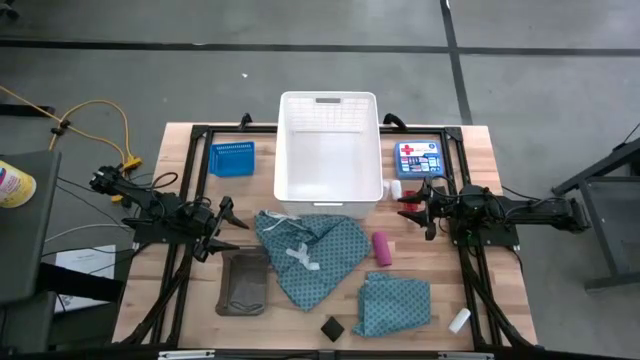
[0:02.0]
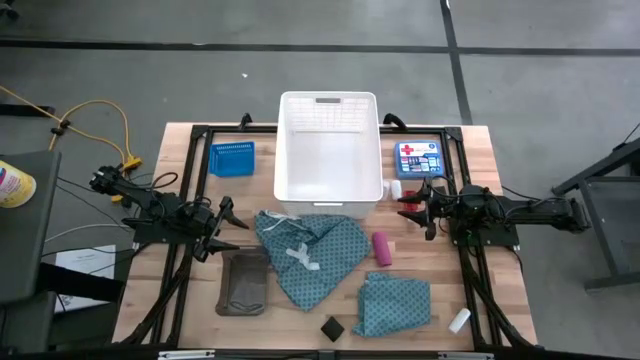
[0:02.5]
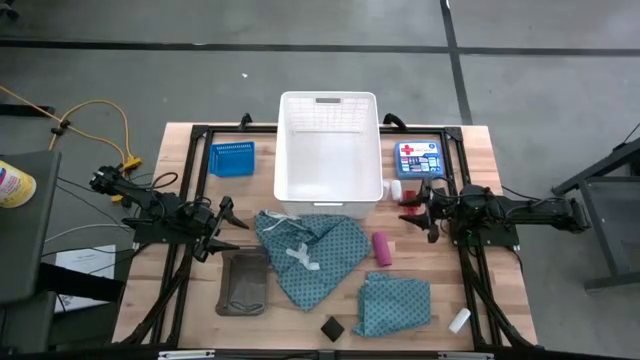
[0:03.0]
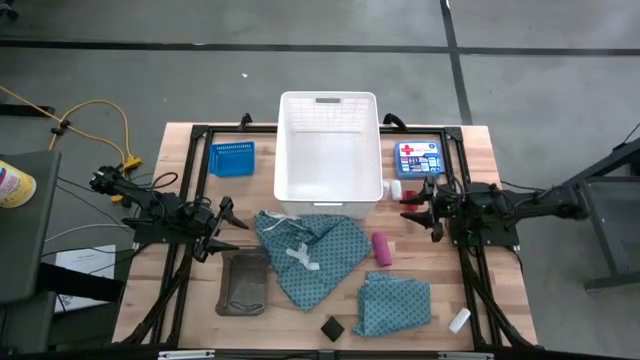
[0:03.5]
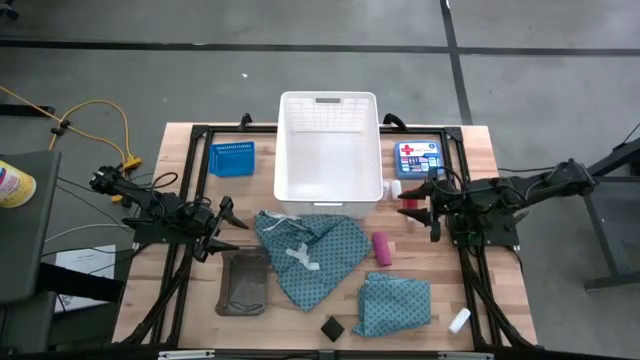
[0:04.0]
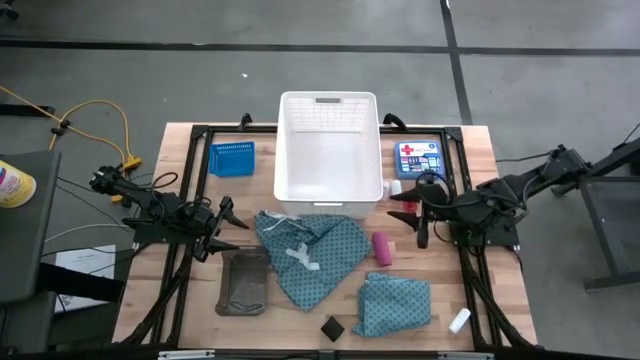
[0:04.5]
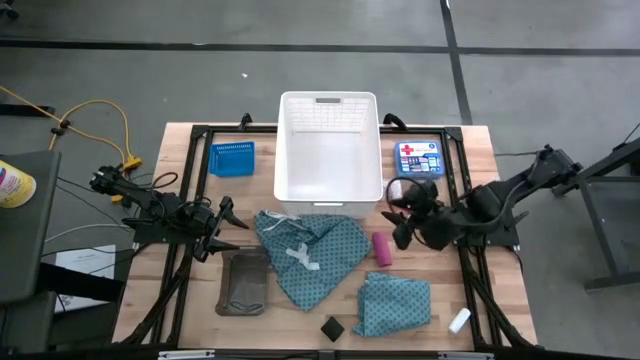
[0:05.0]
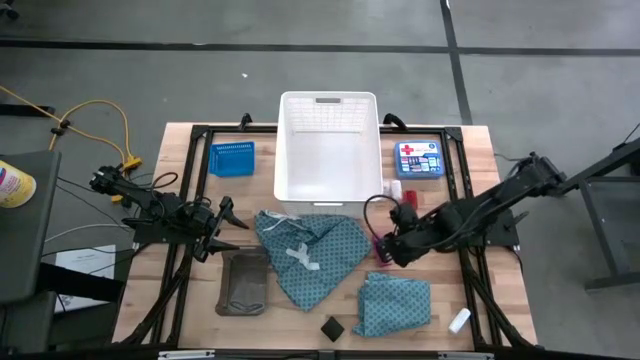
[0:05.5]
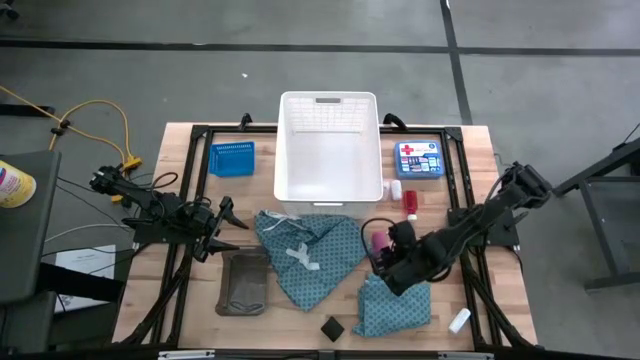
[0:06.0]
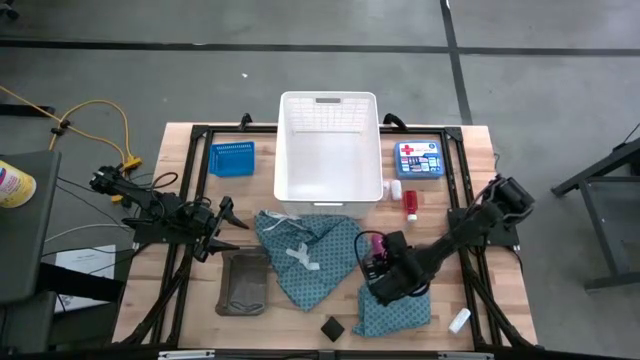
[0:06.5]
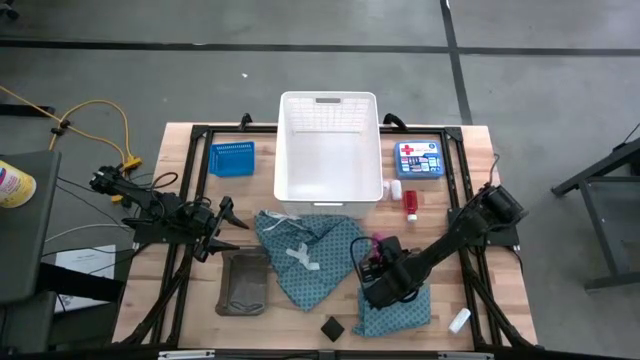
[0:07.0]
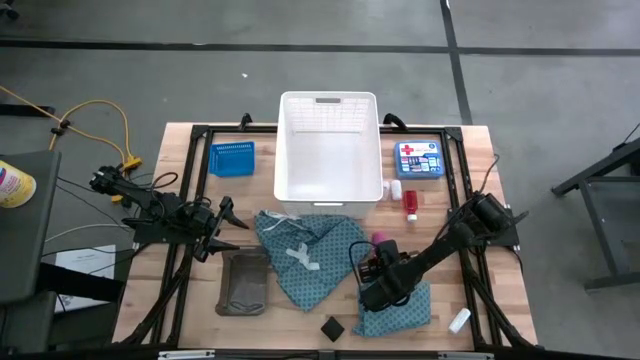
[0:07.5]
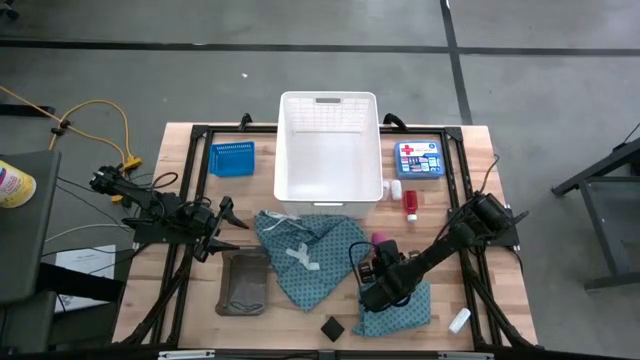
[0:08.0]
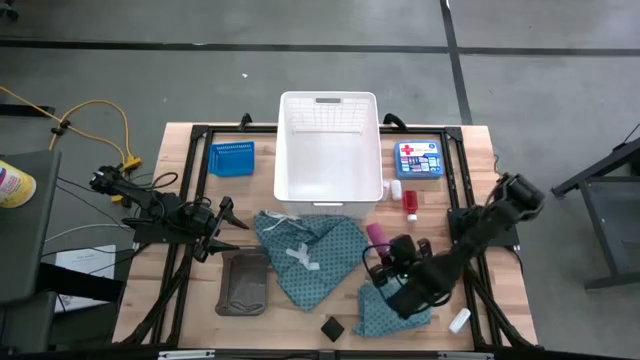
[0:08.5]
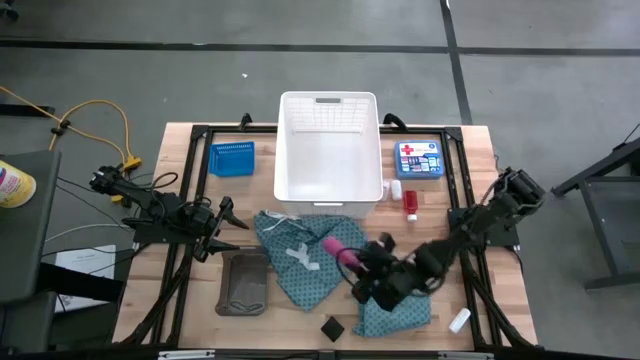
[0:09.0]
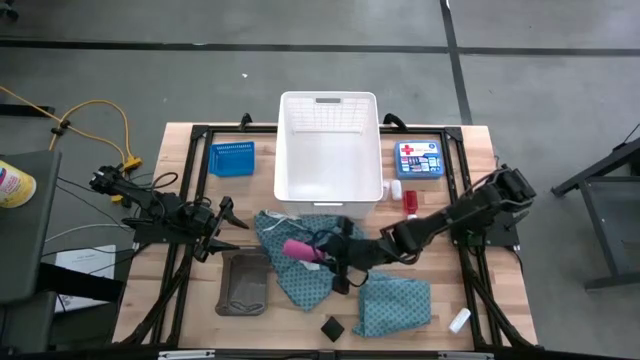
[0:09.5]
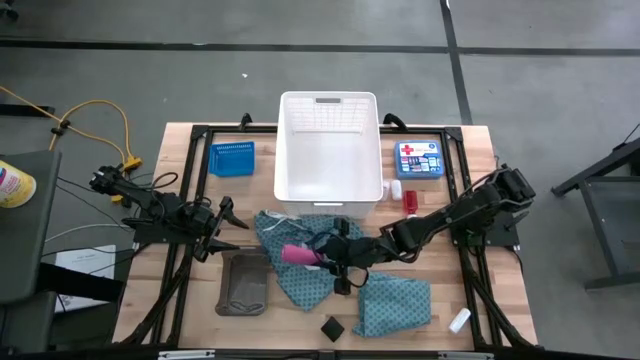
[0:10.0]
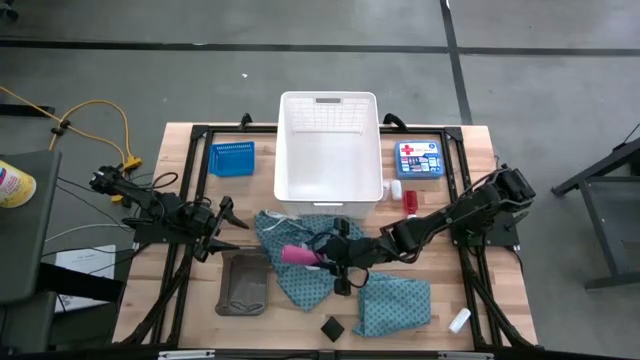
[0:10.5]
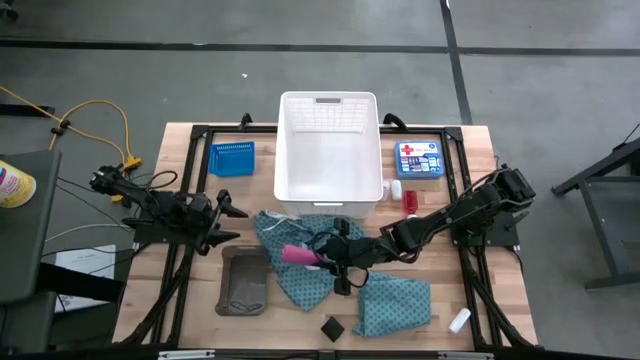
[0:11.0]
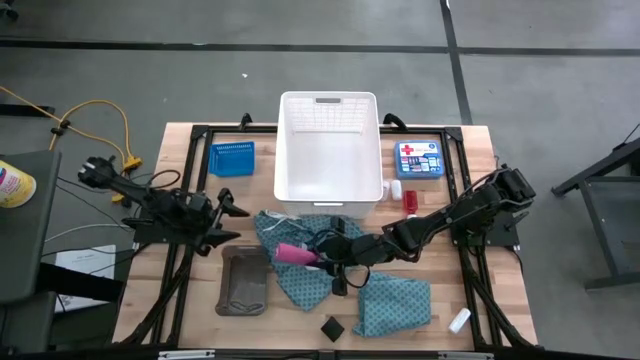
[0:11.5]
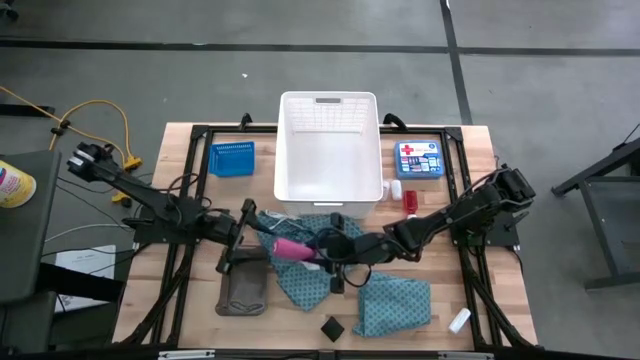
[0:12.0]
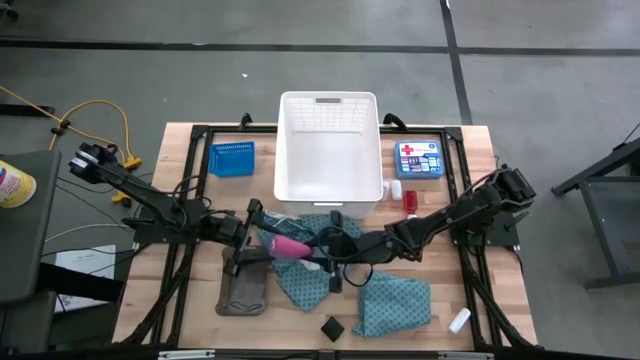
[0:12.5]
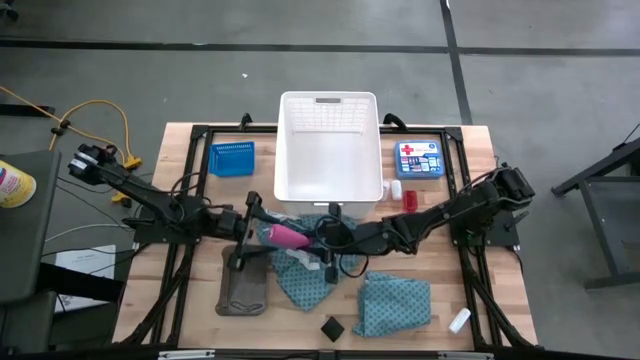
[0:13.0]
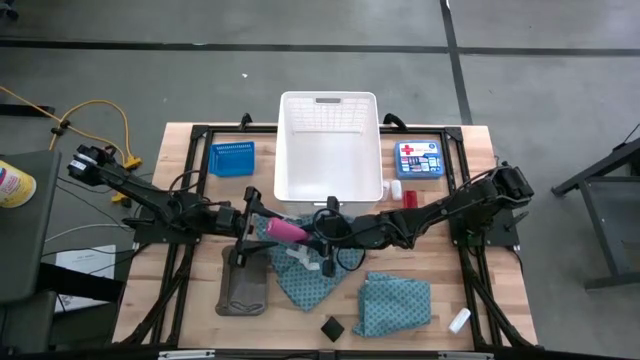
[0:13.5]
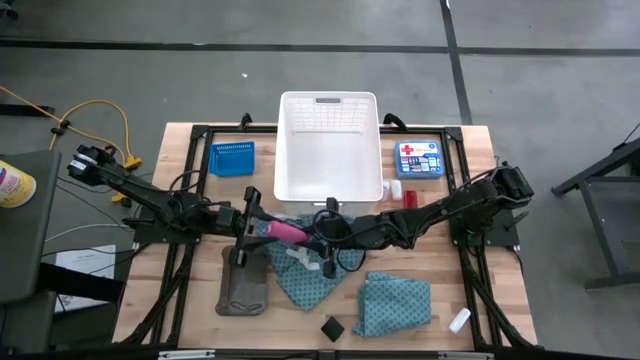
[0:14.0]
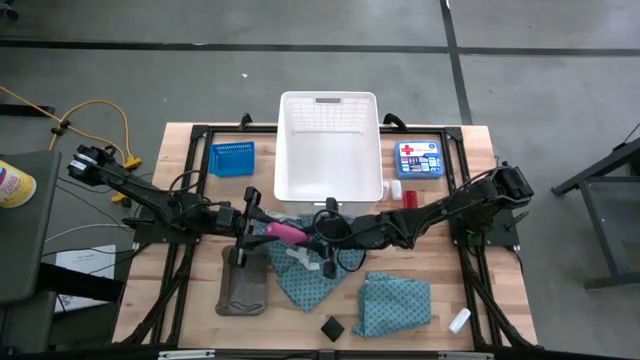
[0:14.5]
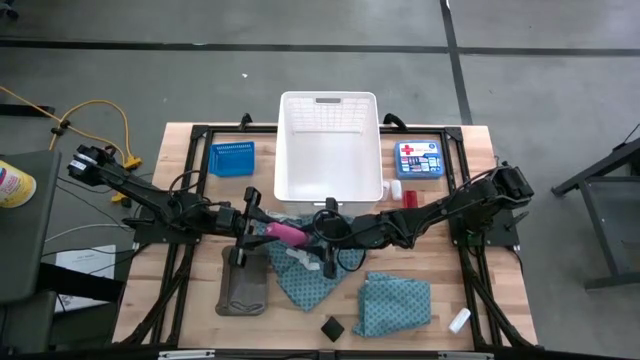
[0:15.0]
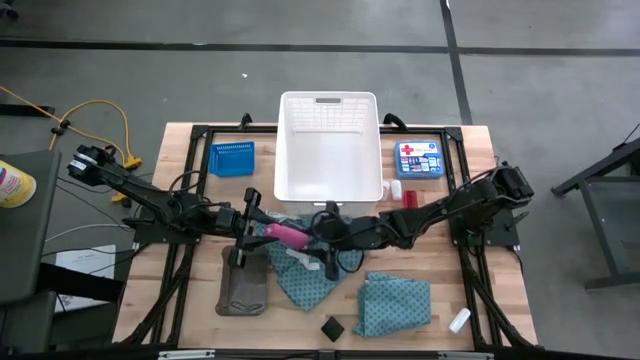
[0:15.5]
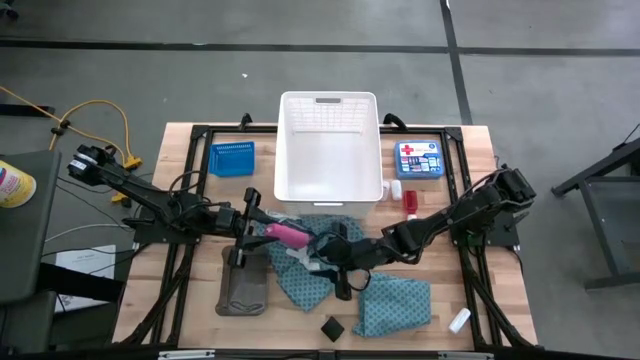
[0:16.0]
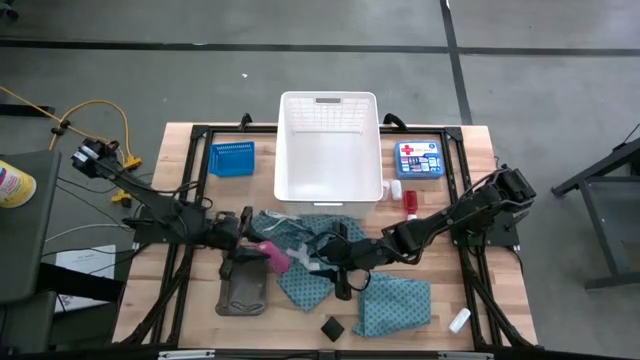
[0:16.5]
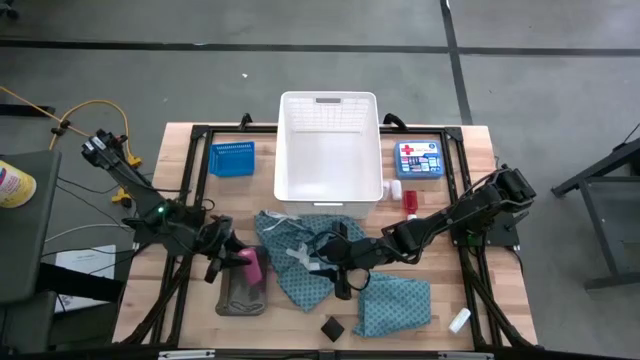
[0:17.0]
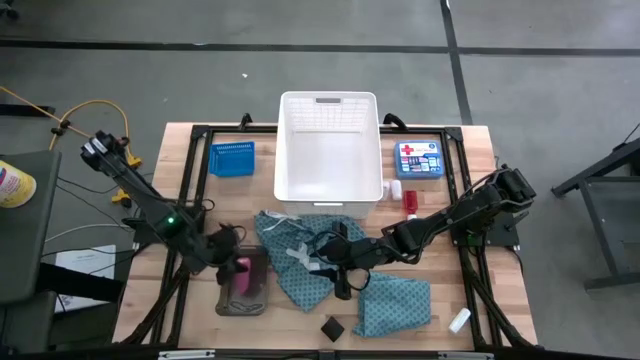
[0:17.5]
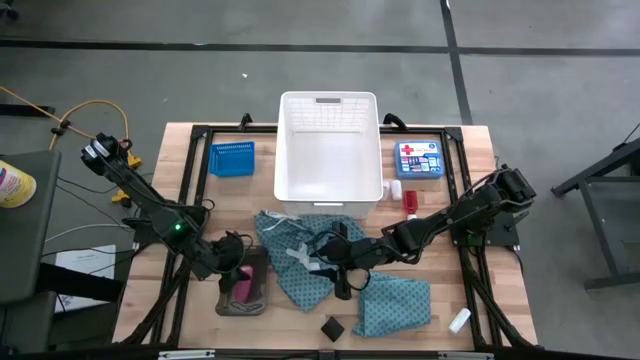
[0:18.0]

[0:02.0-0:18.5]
Task: Pick & place medical supplies in basket/bin
Put the pink bandage into the black bin

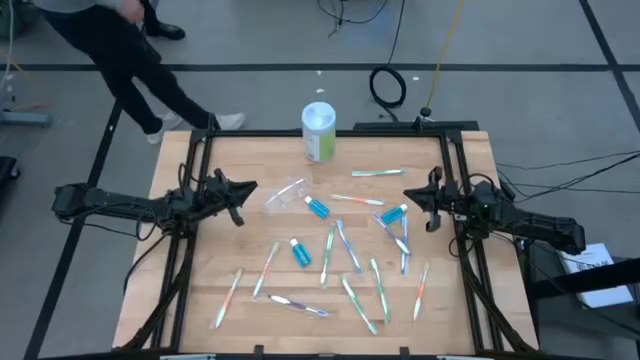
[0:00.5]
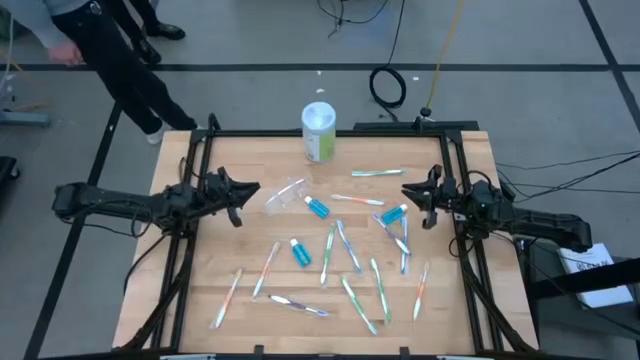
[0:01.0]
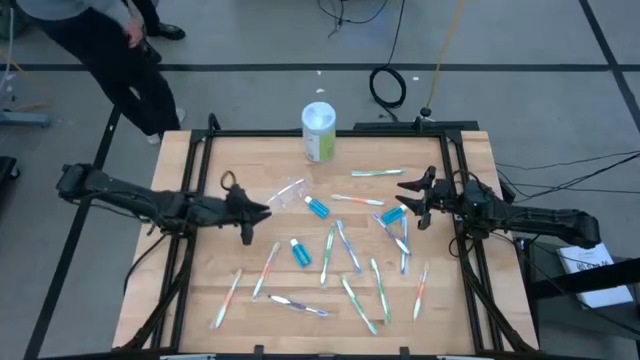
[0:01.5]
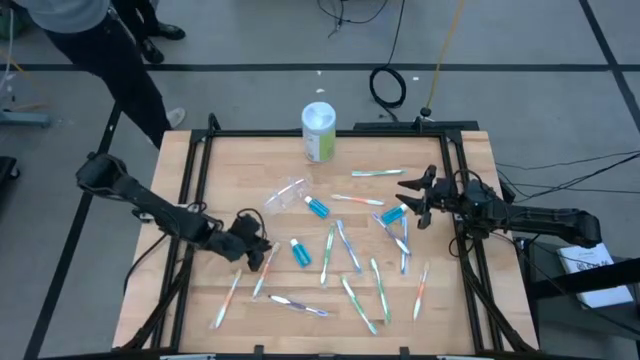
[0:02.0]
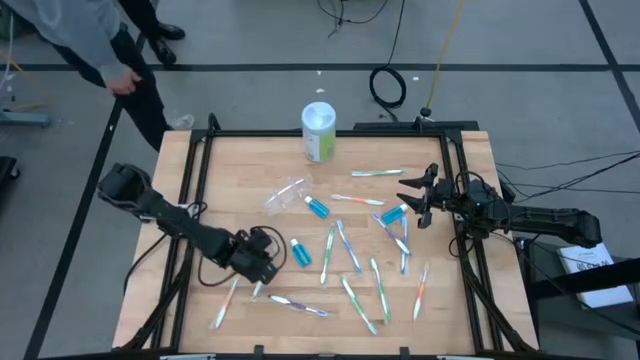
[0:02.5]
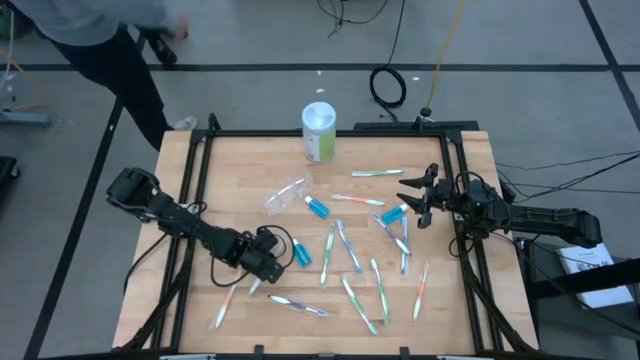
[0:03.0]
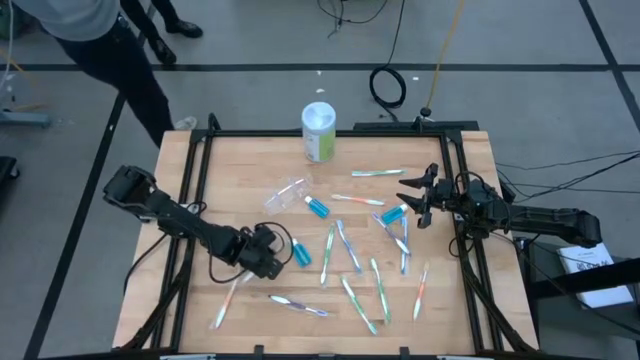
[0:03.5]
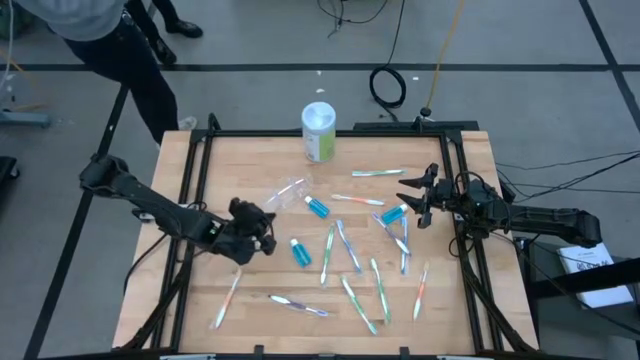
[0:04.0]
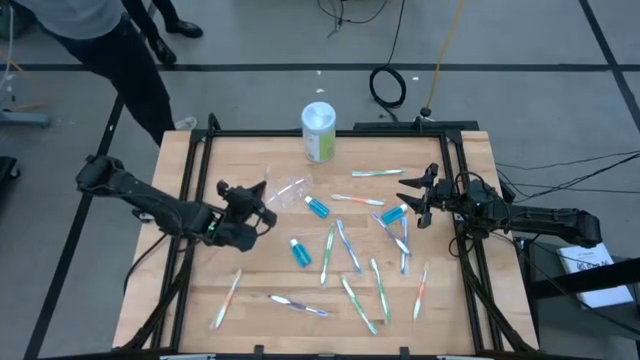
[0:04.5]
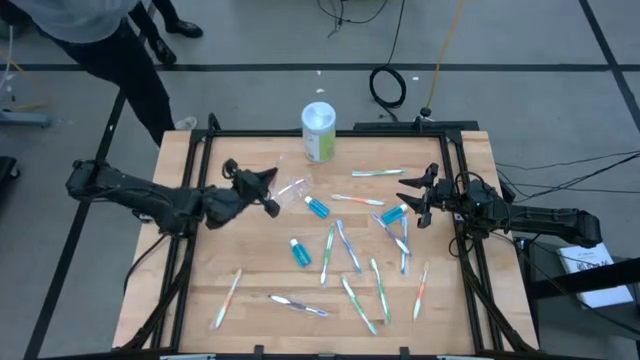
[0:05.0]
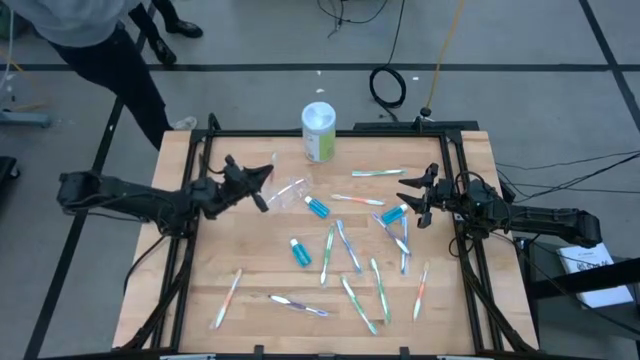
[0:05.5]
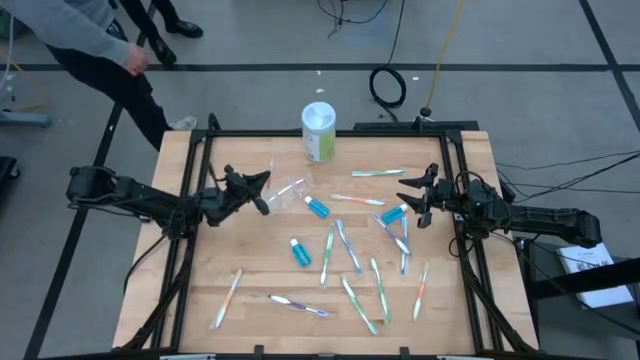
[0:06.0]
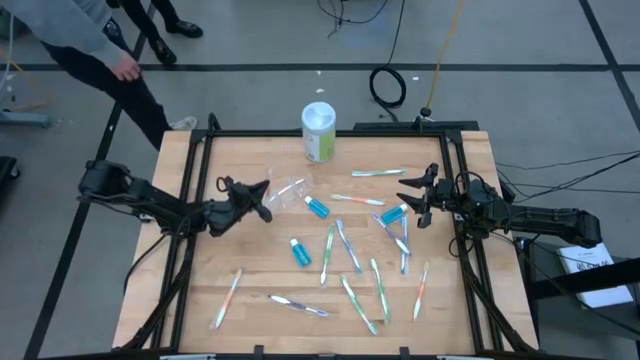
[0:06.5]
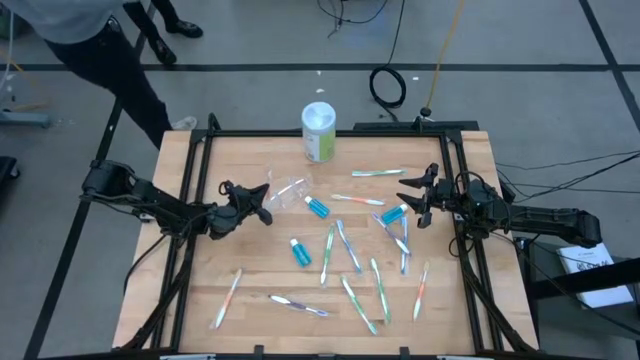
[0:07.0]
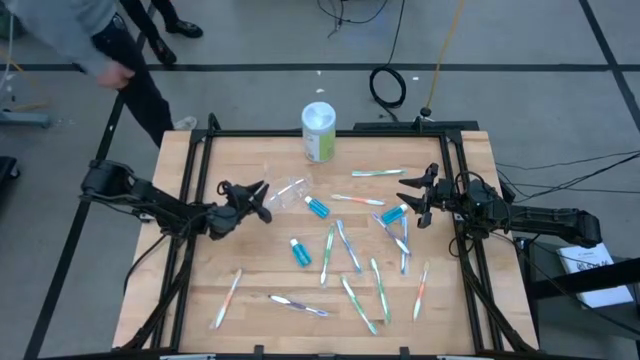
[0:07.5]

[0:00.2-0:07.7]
Task: Pick & Place toothbrushing station
Put the orange toothbrush into the transparent organizer
